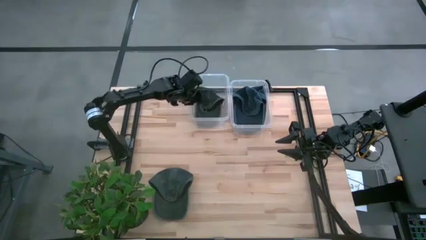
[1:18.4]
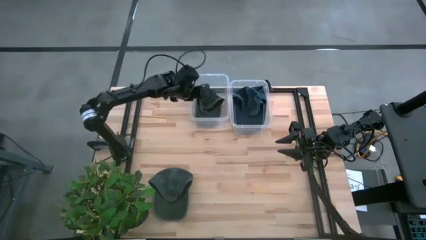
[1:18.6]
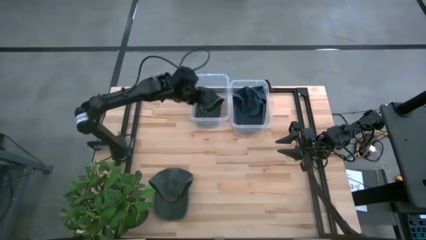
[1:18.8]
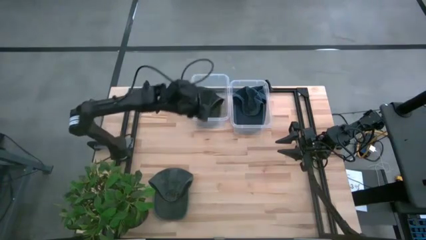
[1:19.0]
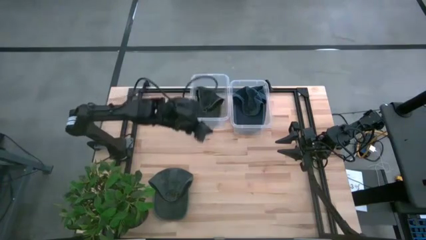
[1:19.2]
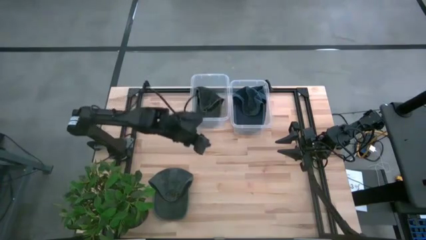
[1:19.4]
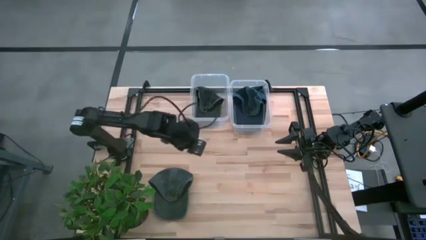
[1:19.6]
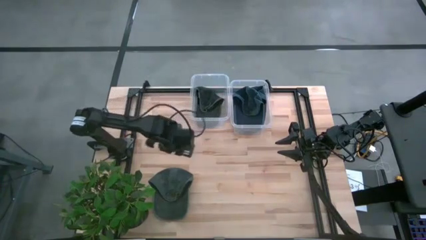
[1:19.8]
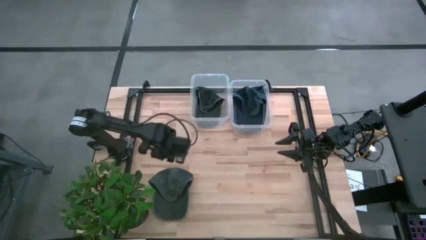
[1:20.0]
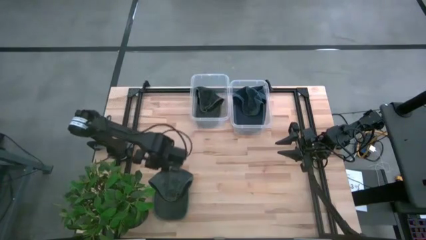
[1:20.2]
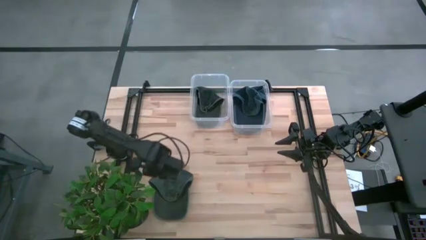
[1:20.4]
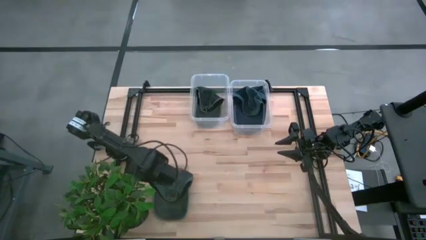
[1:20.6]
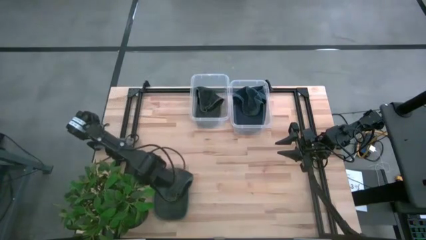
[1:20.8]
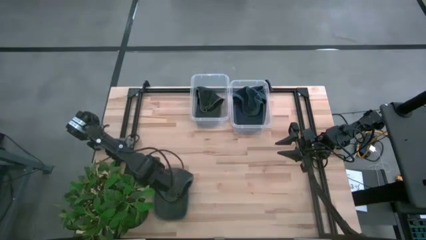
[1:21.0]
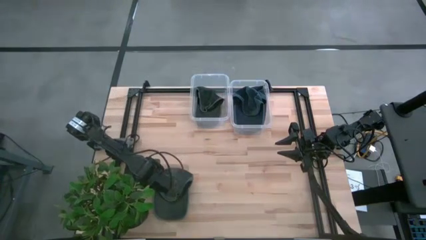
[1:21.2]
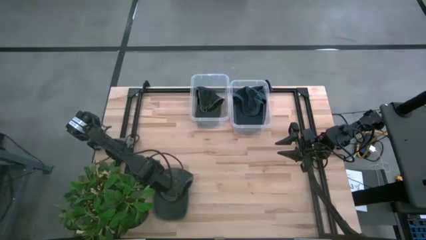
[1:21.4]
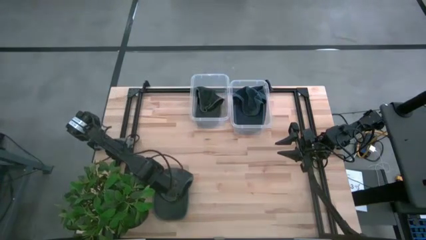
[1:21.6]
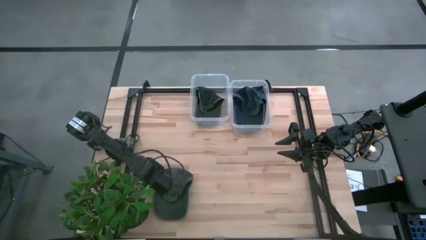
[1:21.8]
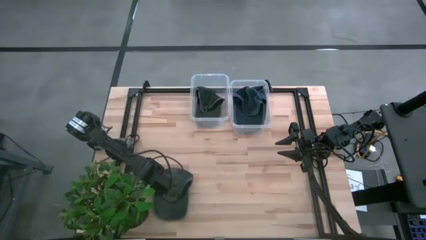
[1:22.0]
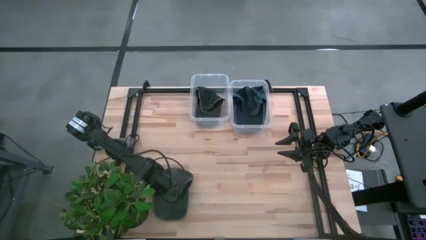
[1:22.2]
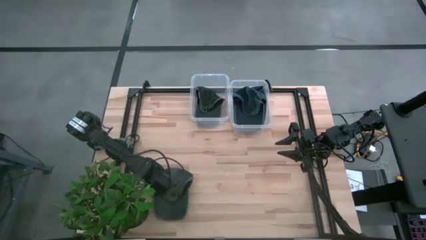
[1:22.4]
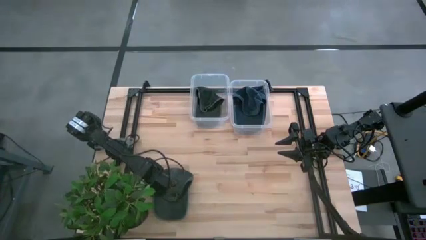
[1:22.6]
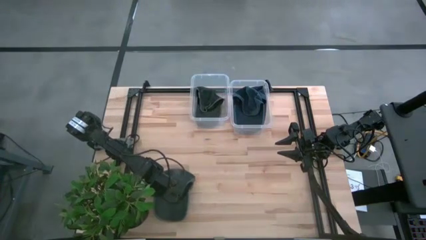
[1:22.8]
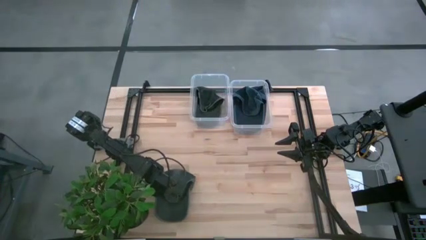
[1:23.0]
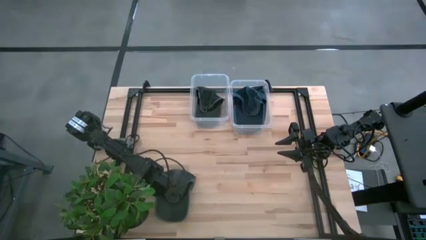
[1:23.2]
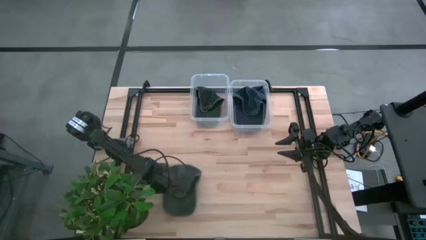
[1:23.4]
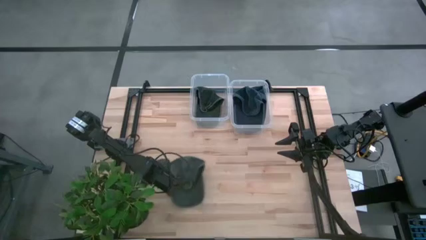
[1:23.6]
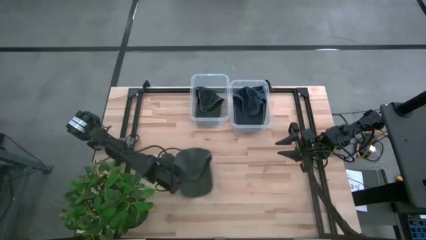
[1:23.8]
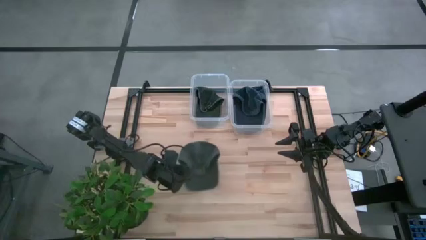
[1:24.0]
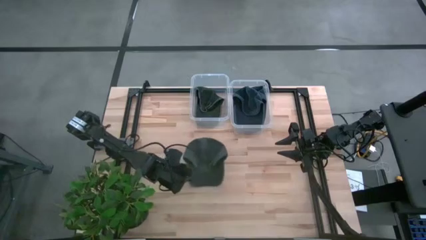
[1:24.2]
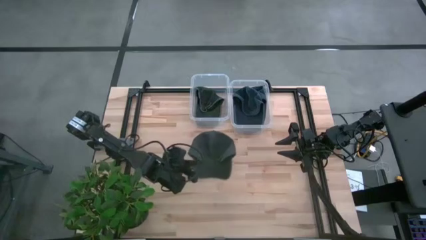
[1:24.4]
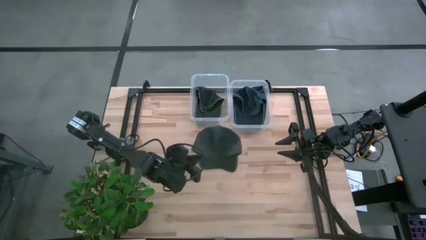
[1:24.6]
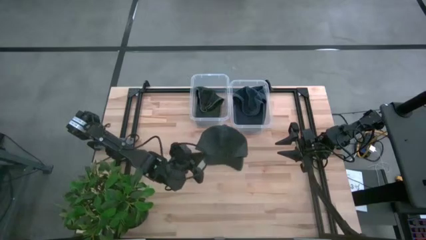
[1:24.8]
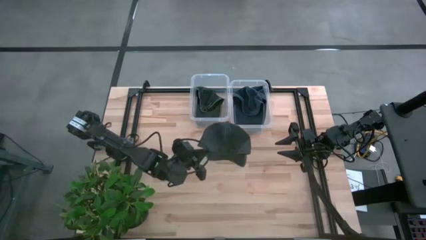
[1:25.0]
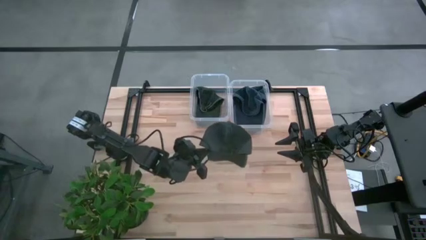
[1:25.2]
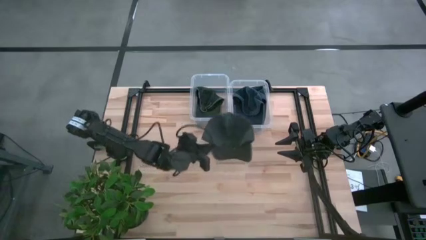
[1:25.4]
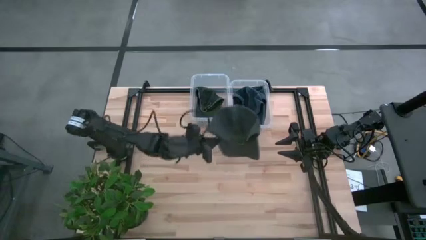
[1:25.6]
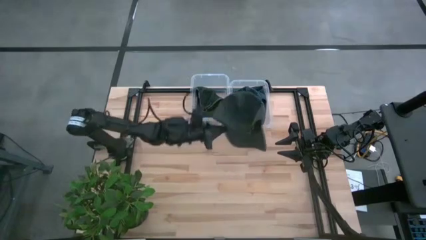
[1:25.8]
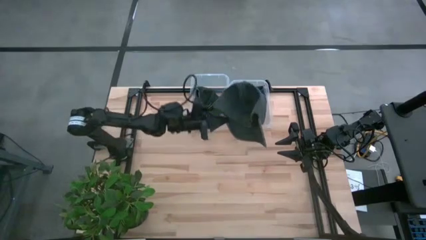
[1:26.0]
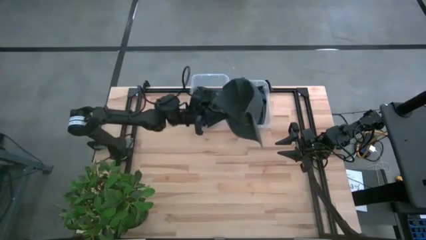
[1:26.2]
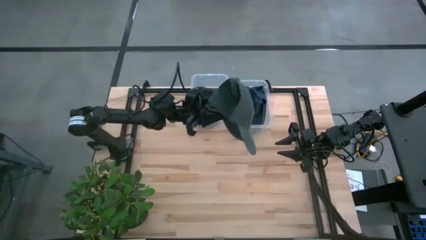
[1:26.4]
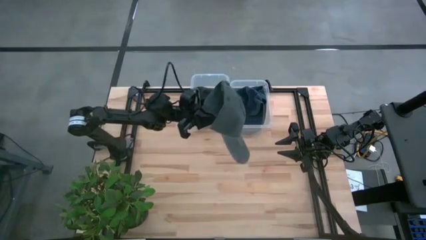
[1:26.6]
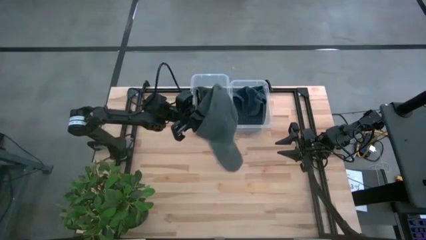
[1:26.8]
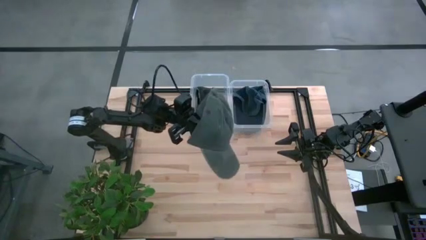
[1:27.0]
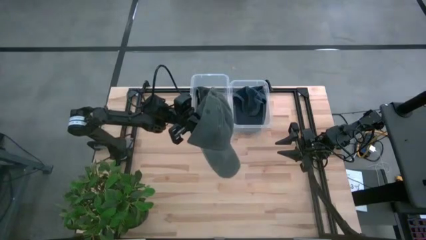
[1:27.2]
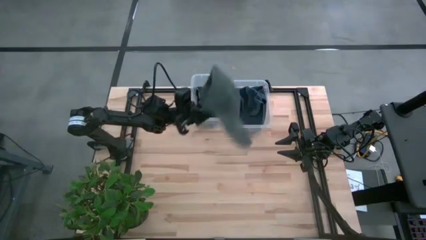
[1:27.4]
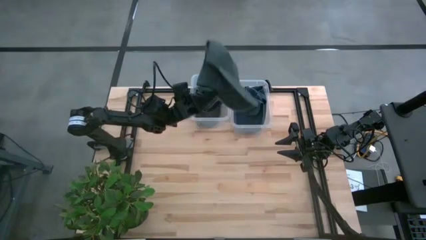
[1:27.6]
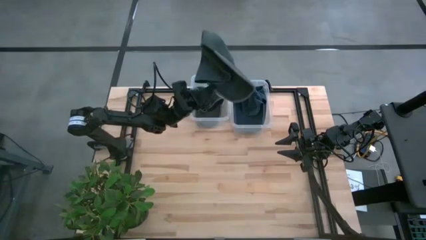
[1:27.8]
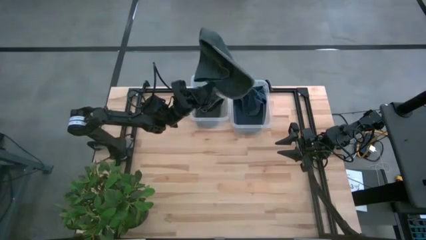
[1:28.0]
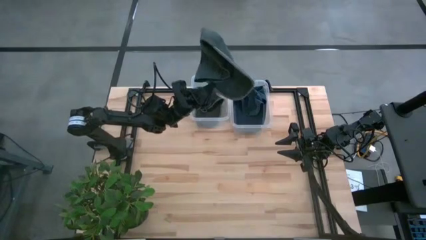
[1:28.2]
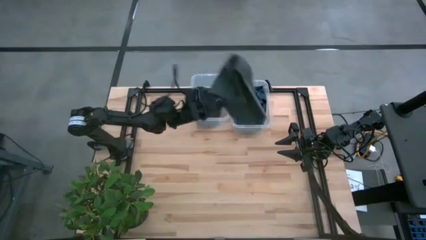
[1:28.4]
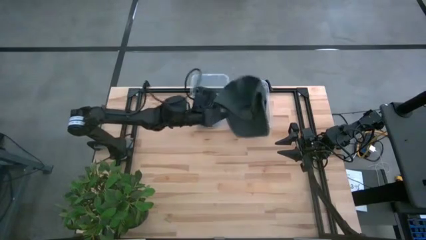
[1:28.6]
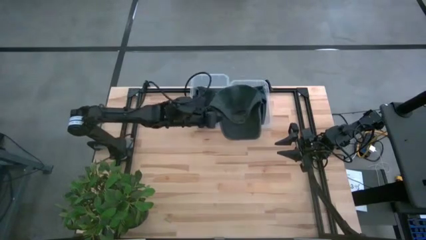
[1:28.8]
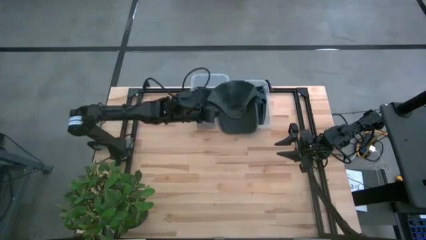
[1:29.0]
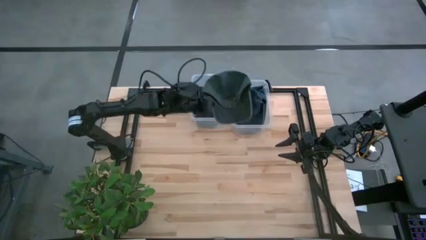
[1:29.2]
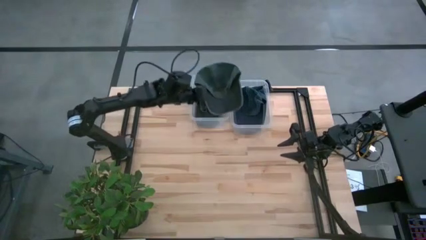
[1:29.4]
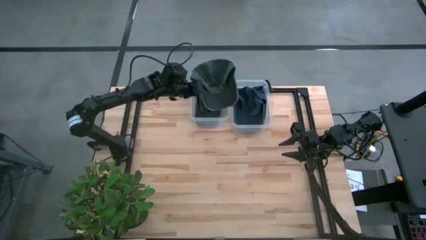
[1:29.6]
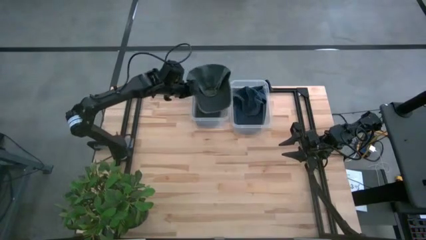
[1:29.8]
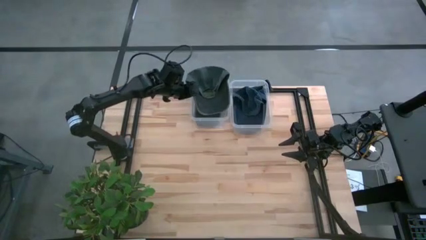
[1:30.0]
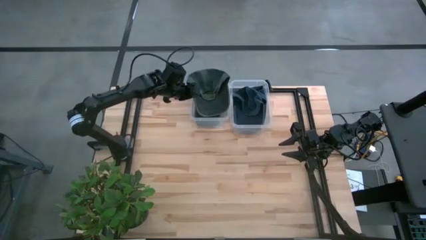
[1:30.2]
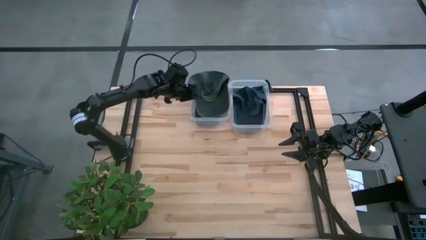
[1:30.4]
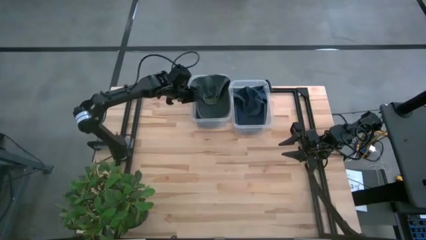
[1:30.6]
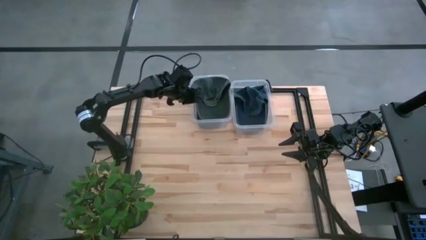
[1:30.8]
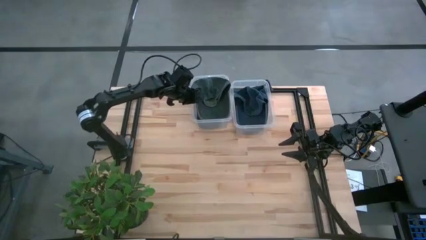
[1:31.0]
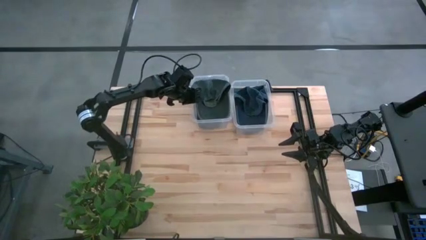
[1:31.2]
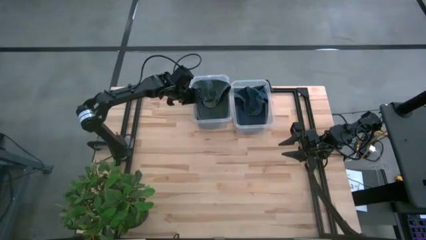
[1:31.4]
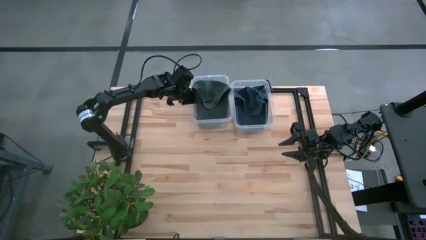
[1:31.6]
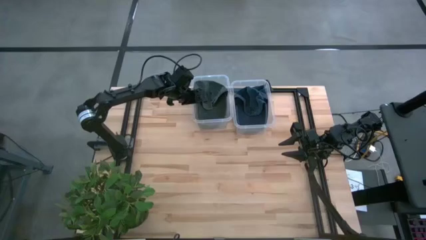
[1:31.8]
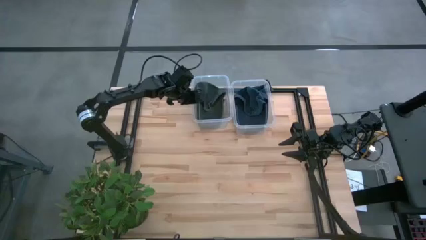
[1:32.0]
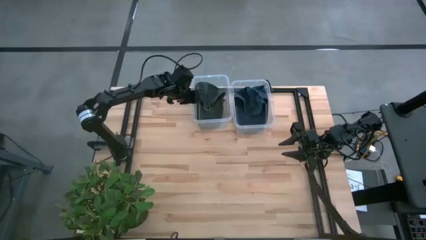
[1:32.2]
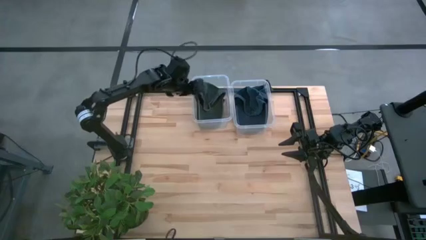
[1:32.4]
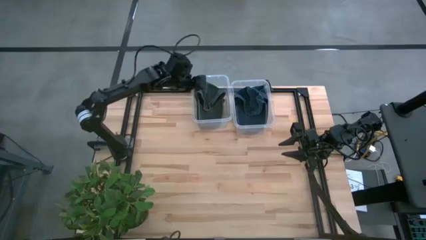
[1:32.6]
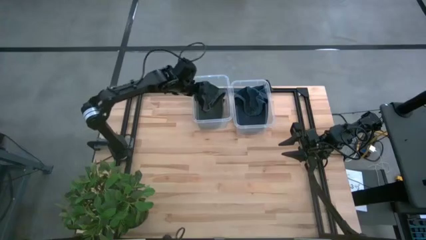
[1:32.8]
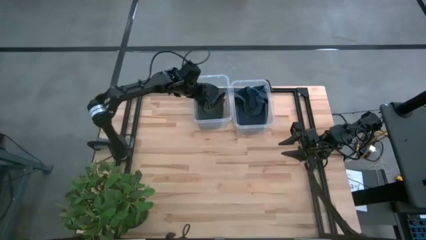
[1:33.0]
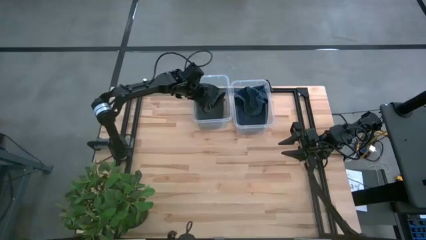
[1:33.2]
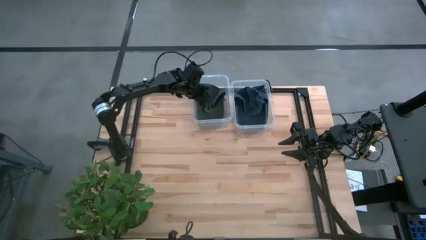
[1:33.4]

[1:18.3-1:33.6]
Task: Pick & Place hat
Put the dark gray cap into the left transparent bin
